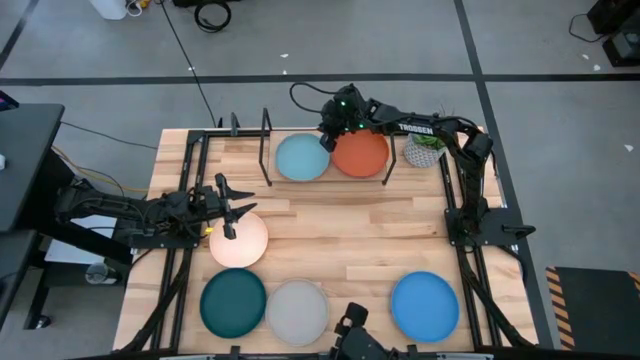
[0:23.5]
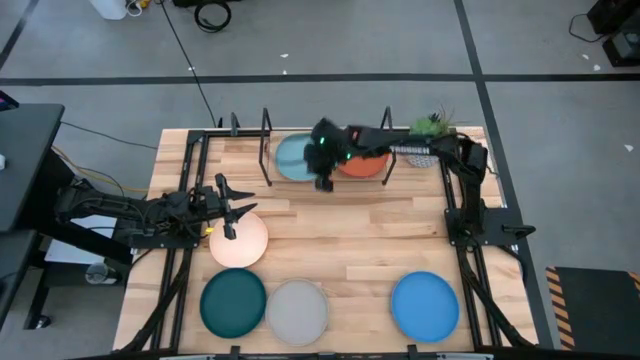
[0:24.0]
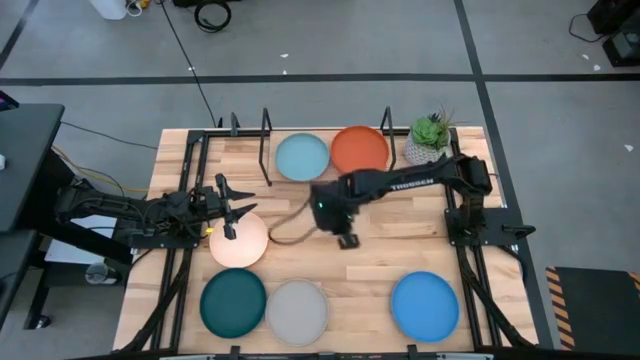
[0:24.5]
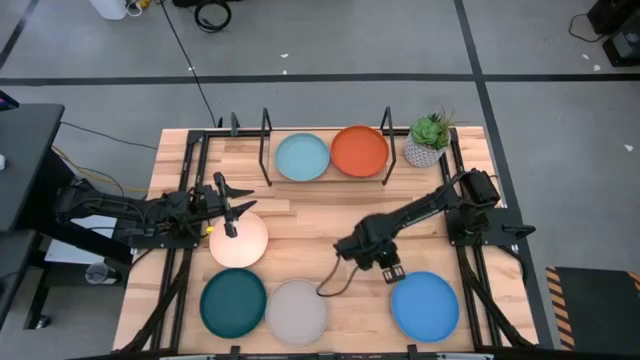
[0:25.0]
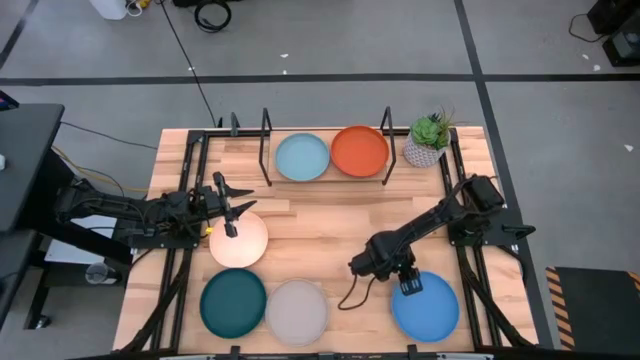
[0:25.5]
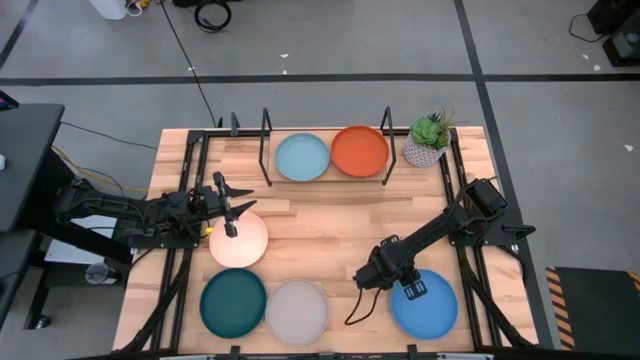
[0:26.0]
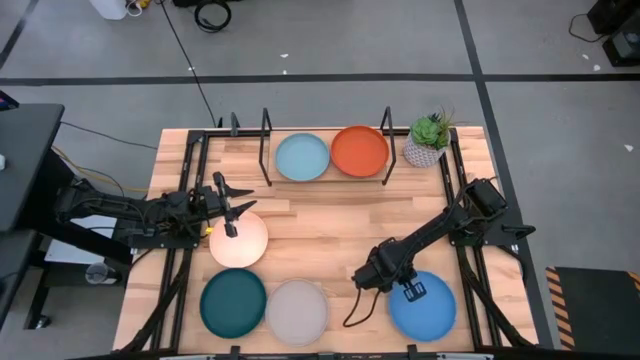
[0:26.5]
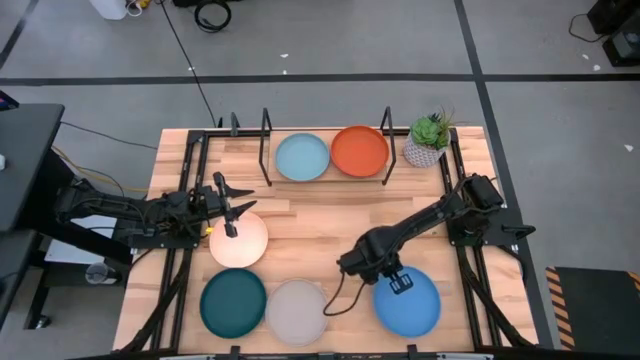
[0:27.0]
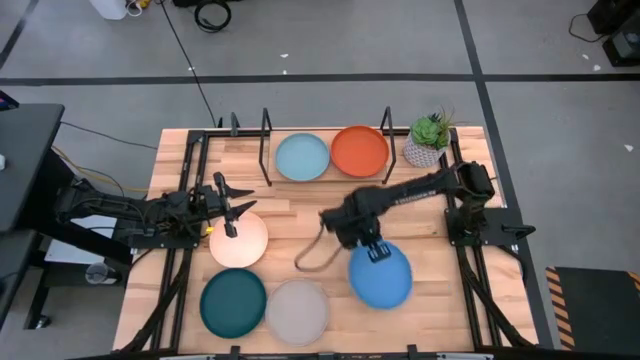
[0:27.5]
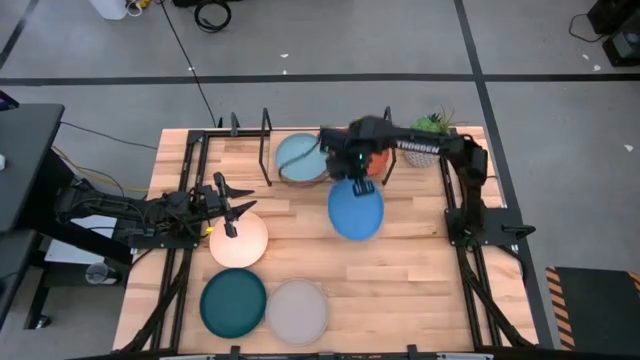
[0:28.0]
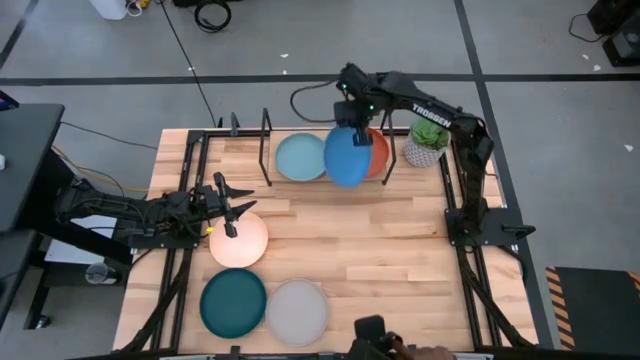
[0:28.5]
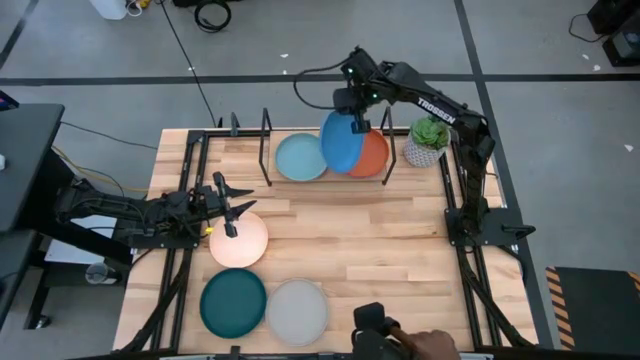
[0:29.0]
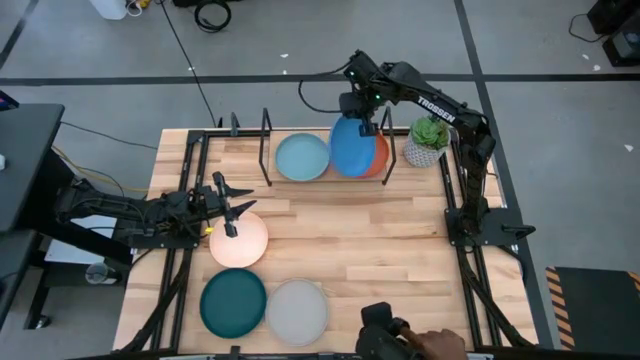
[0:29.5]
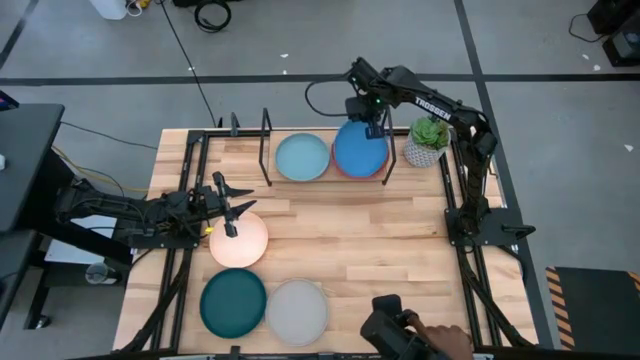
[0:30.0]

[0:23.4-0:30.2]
Task: Place and stack plates onto a shelf
Stack the blue plate on top of the orange plate on the shelf

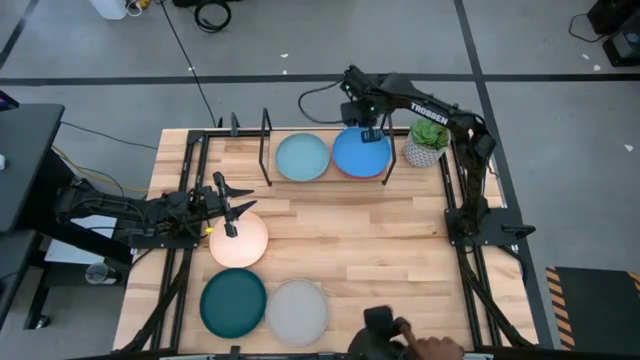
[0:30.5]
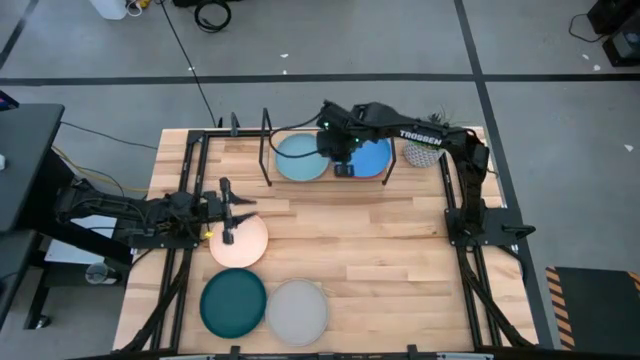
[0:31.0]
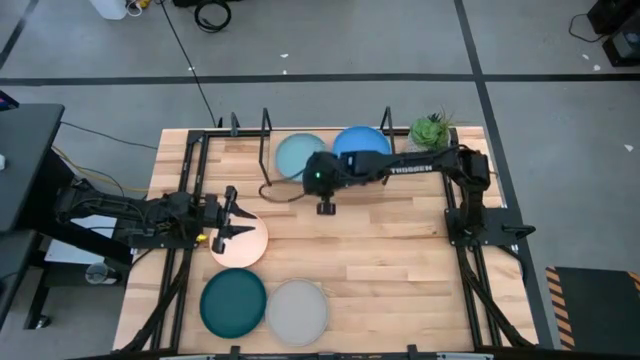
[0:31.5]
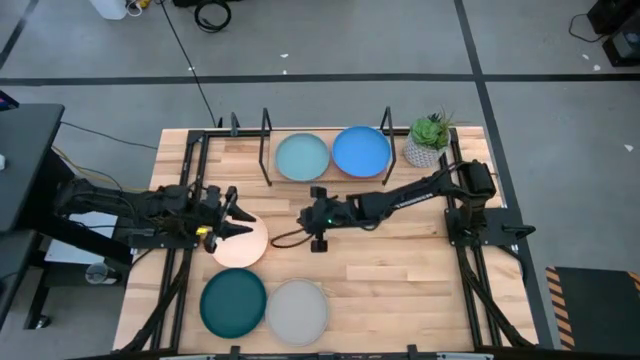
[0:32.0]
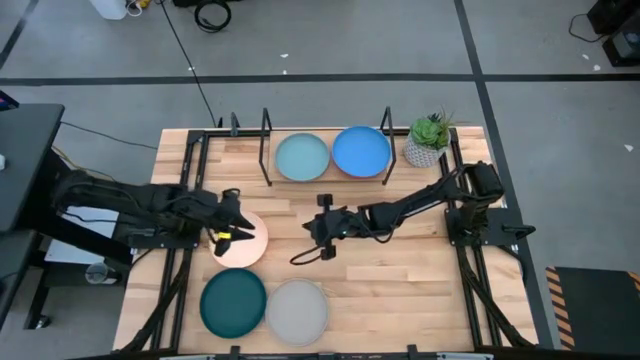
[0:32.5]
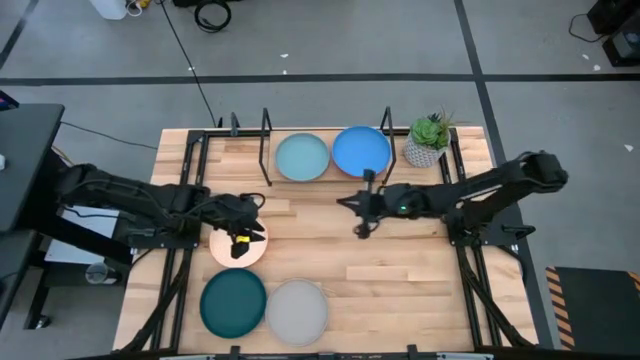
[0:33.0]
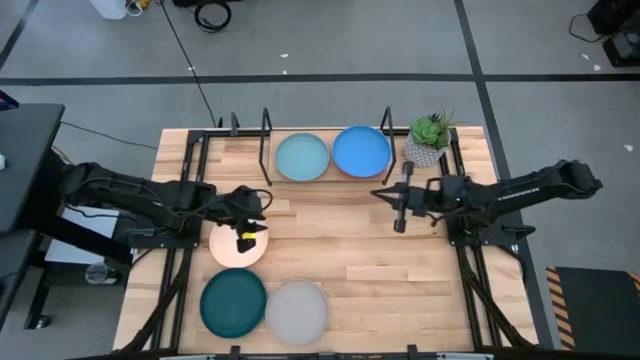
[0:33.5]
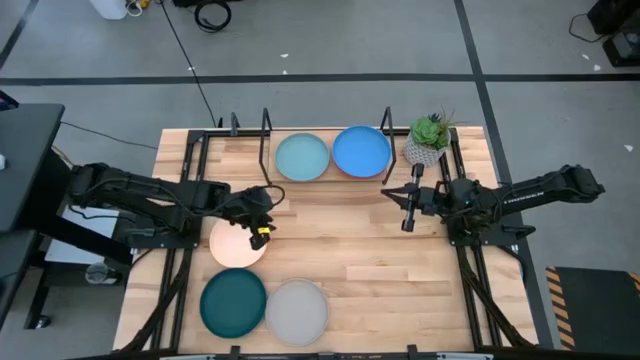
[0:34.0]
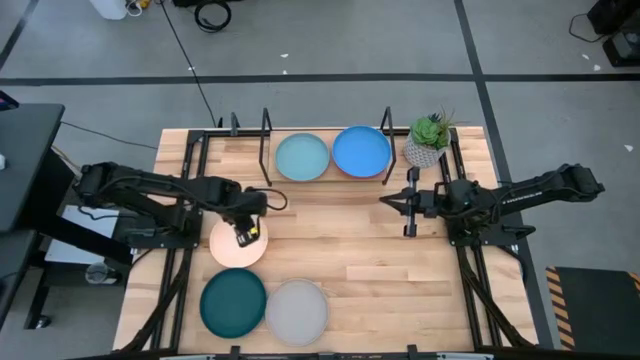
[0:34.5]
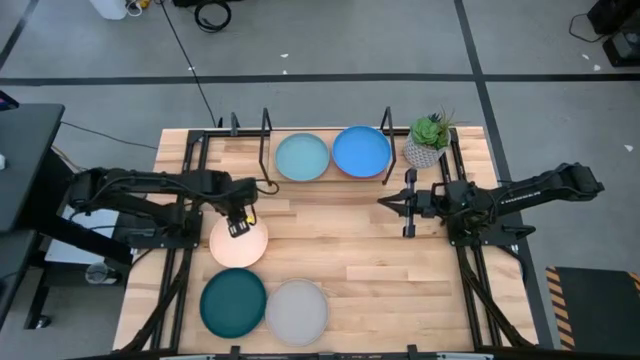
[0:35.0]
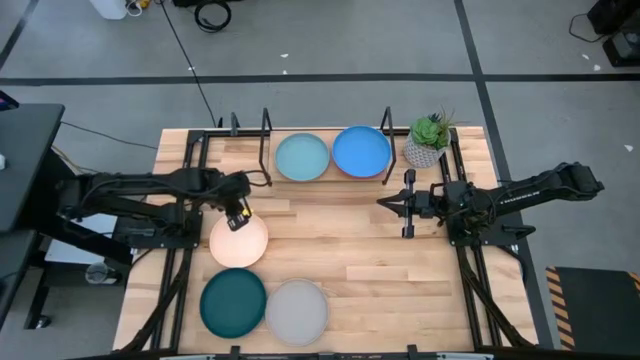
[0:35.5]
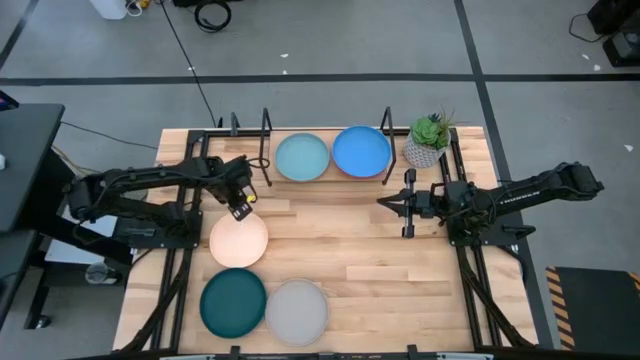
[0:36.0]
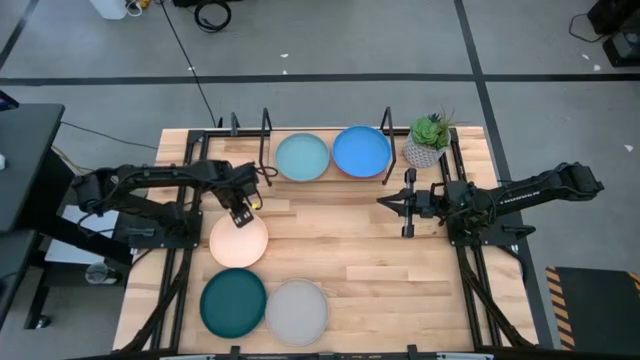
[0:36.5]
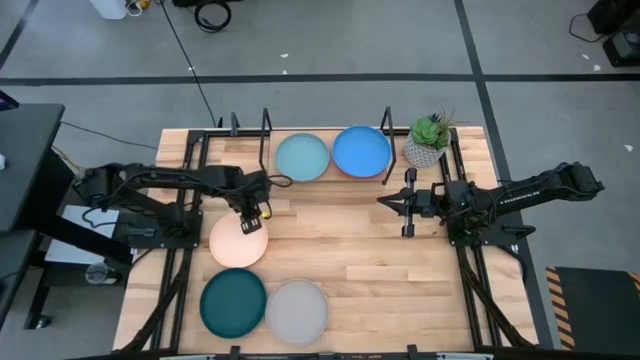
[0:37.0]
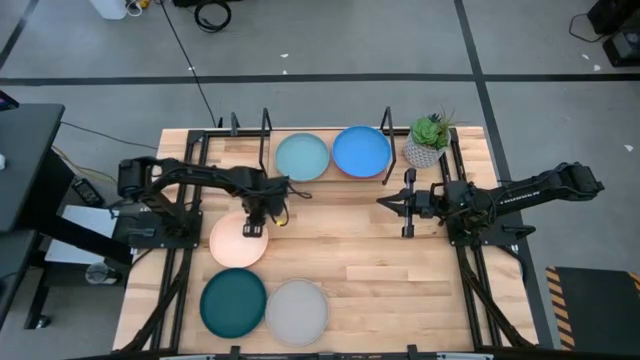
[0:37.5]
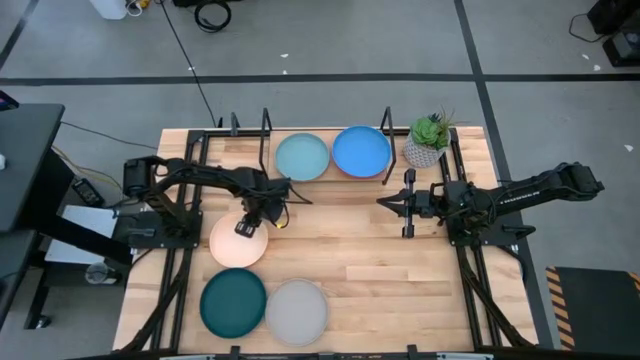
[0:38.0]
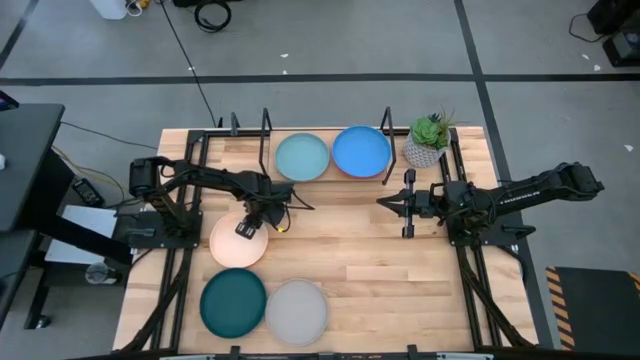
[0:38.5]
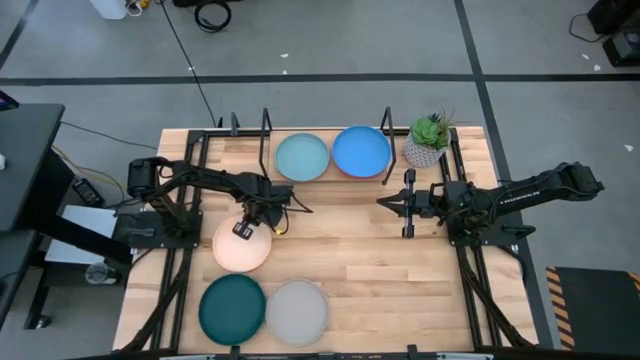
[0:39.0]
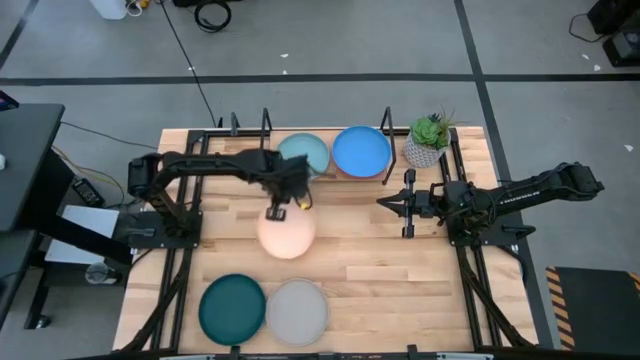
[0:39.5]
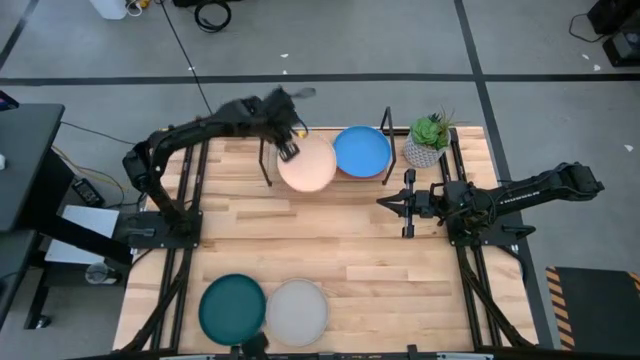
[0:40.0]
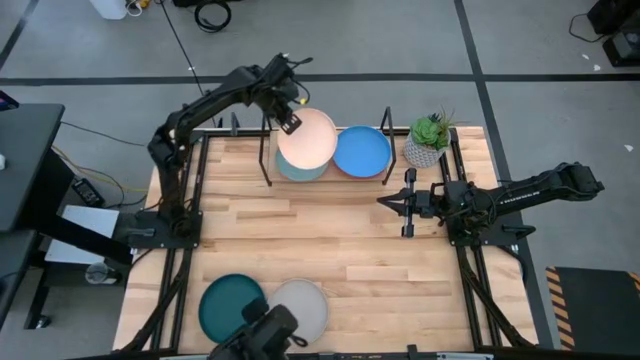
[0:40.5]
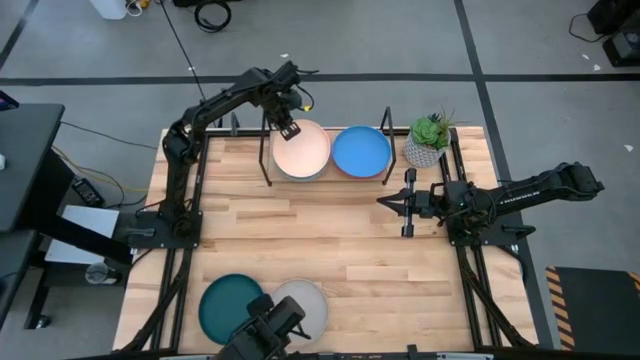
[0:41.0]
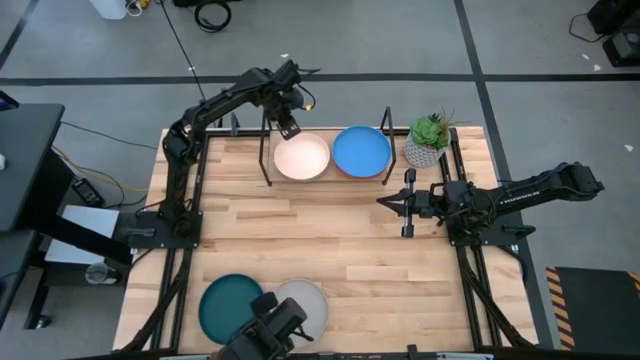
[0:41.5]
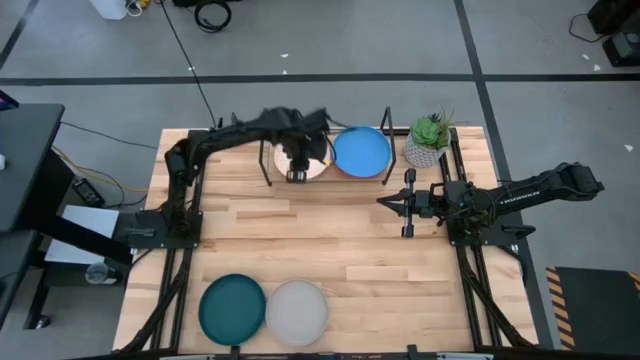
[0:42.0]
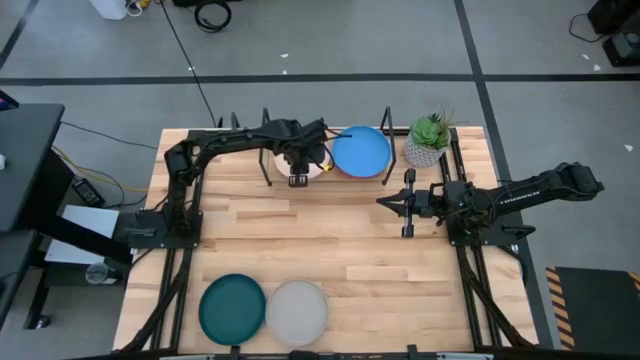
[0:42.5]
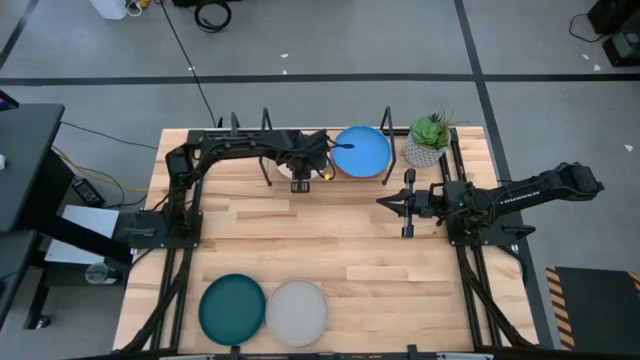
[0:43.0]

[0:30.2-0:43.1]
Stack the light pink plate on top of the light blue plate on the shelf

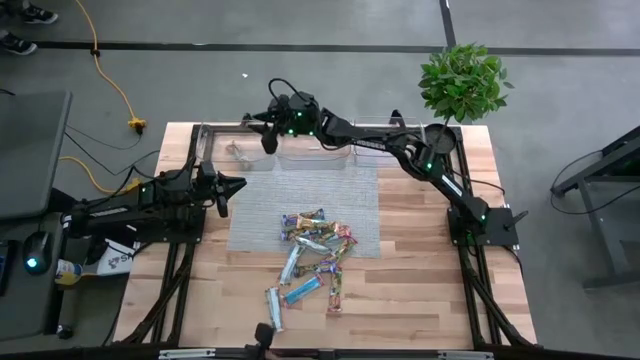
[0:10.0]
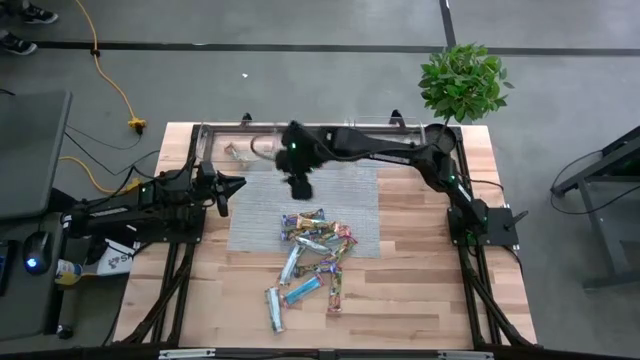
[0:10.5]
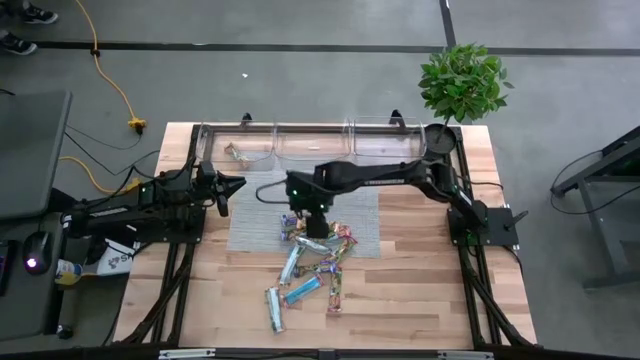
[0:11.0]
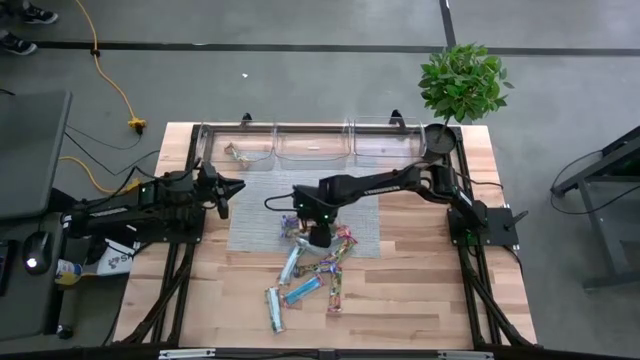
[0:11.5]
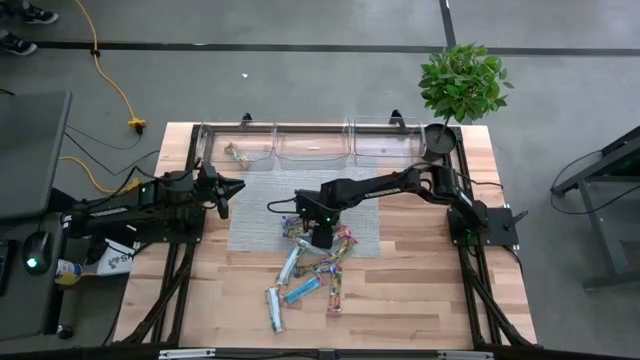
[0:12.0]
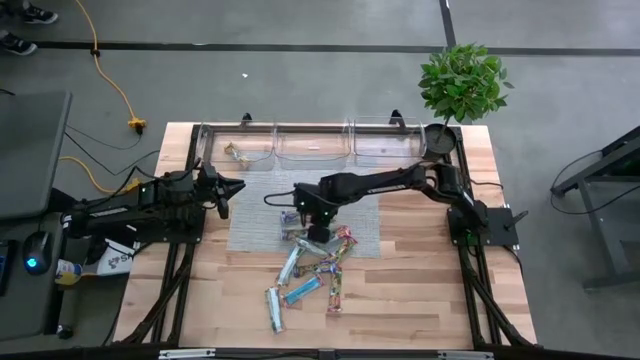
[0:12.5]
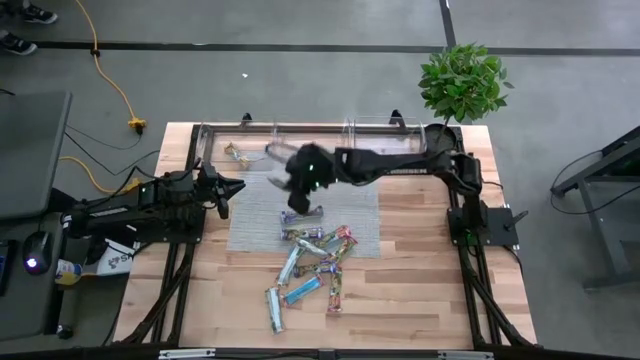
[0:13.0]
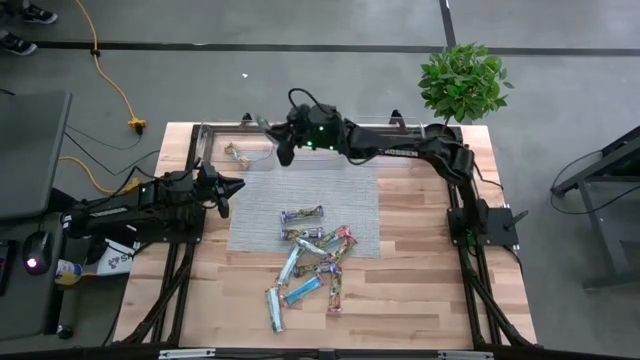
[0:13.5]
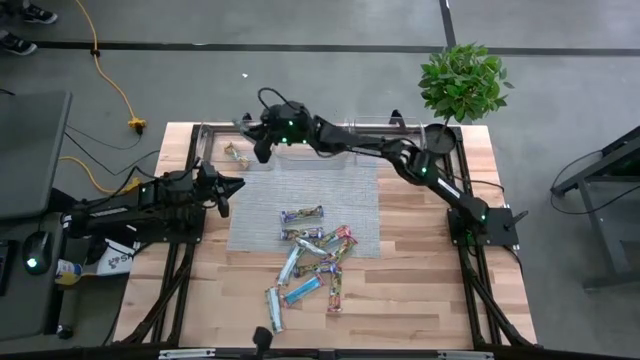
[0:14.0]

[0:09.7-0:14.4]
Task: Pick and place Granola Bars by type
Put the yellow granola bar into the left transparent bin
